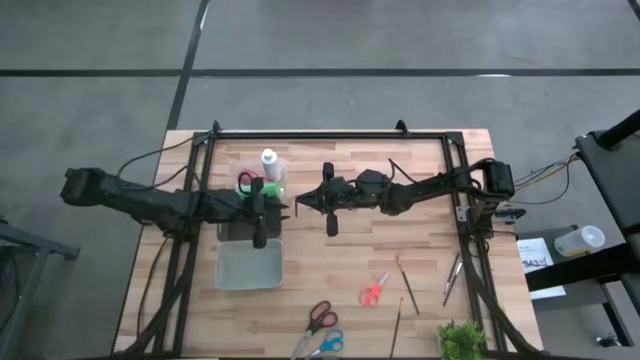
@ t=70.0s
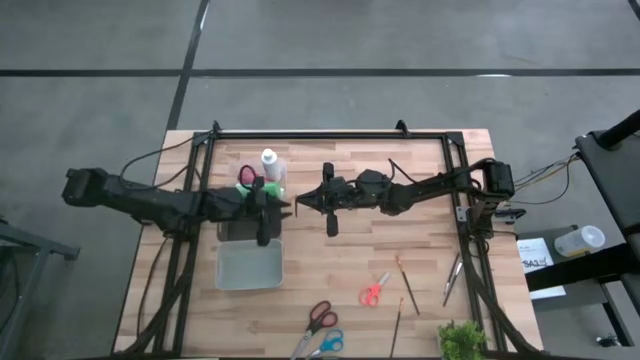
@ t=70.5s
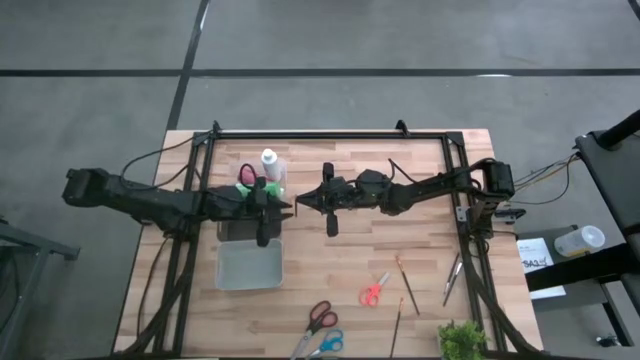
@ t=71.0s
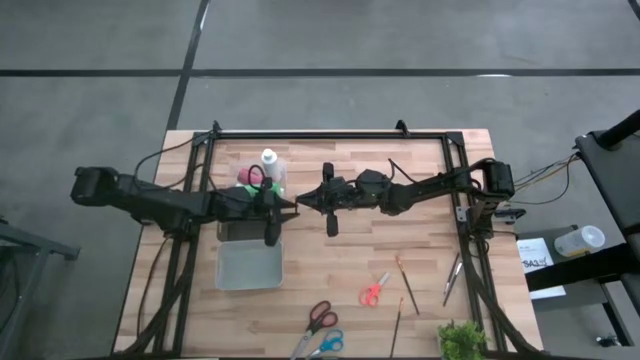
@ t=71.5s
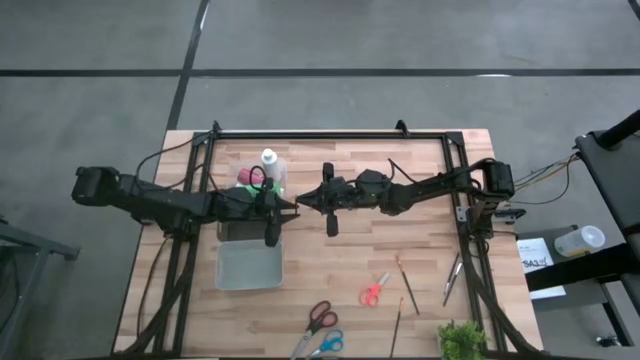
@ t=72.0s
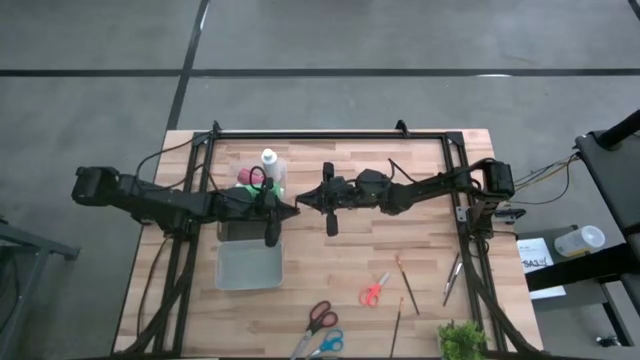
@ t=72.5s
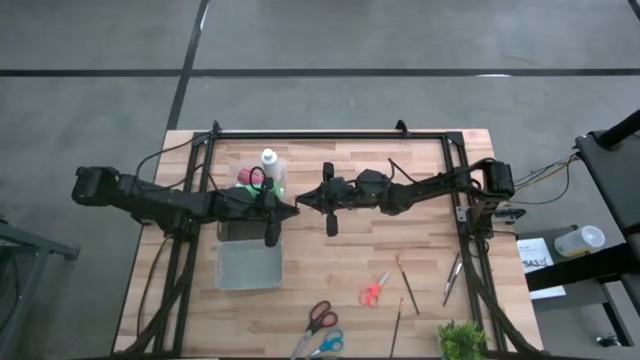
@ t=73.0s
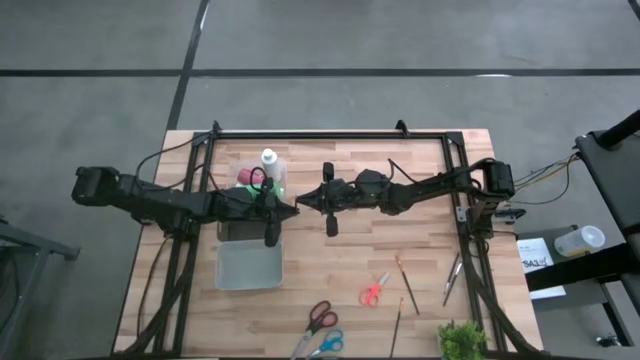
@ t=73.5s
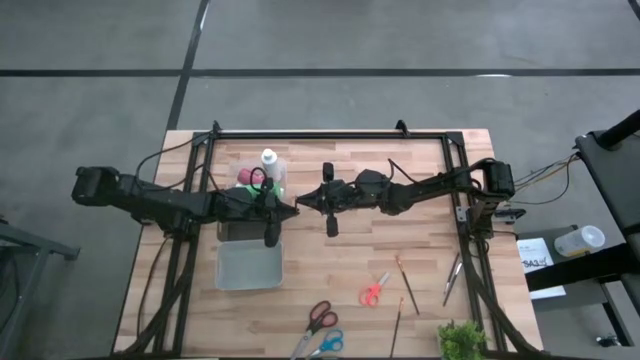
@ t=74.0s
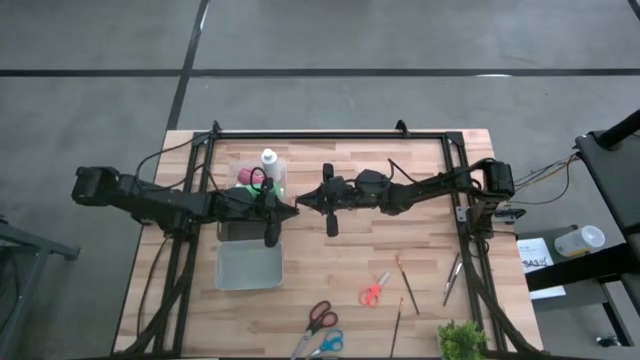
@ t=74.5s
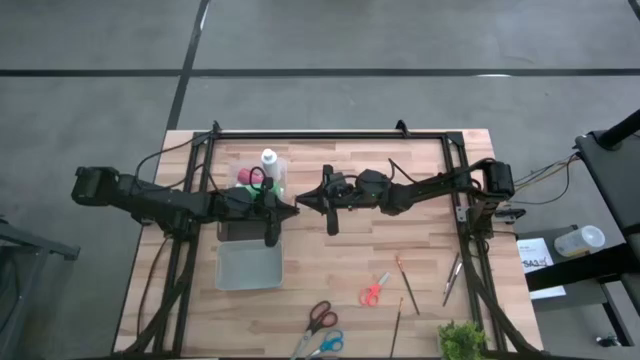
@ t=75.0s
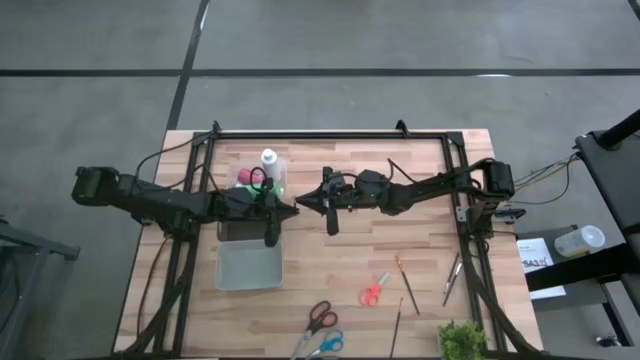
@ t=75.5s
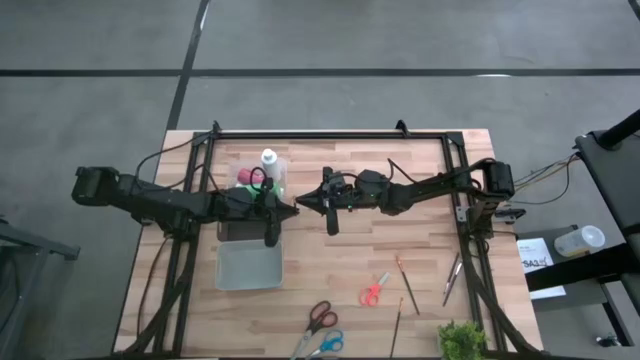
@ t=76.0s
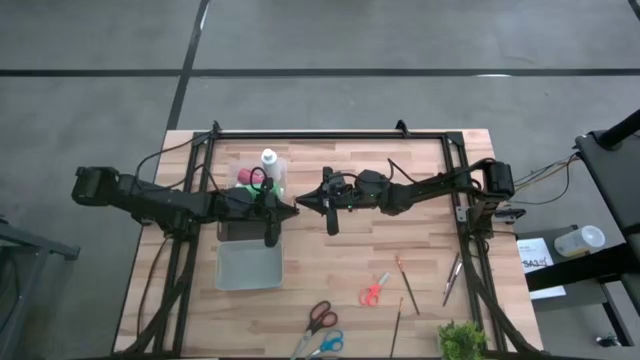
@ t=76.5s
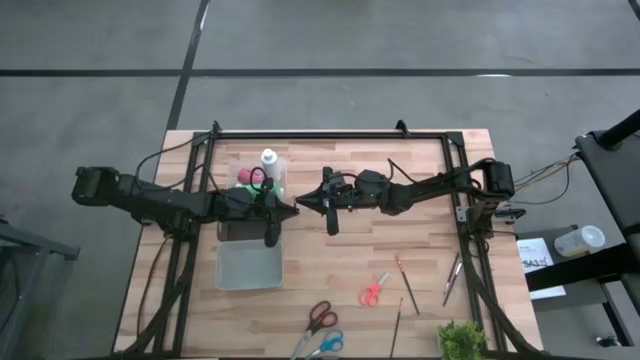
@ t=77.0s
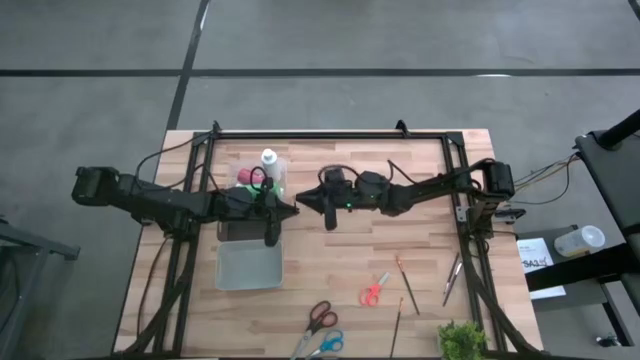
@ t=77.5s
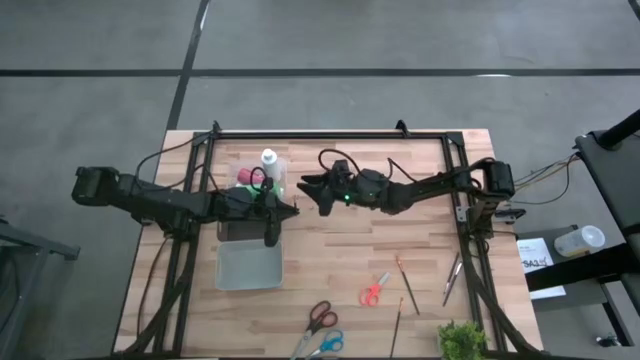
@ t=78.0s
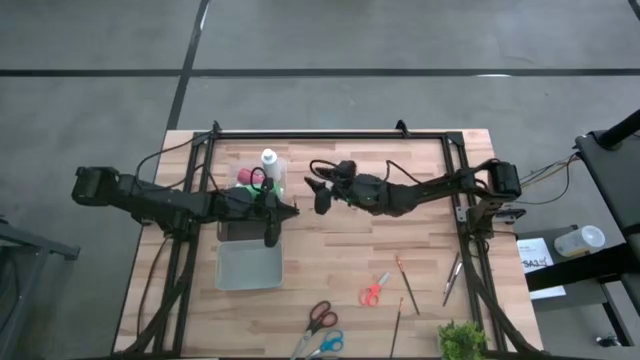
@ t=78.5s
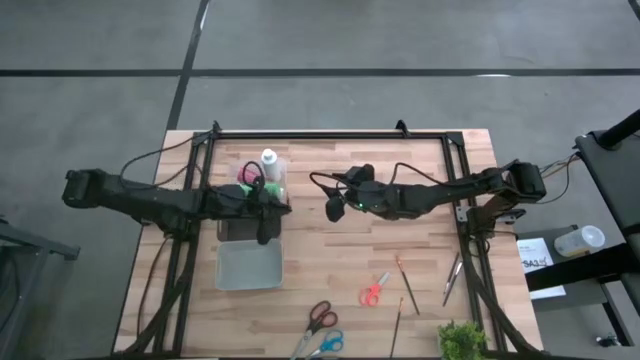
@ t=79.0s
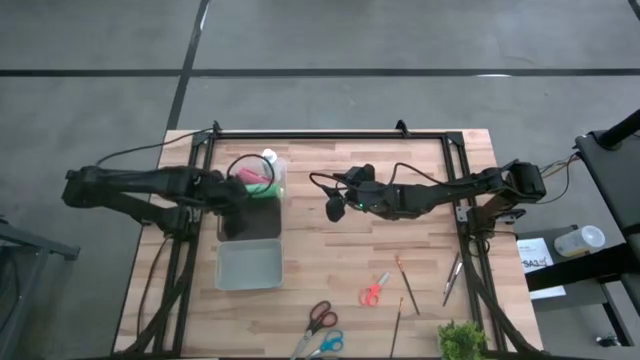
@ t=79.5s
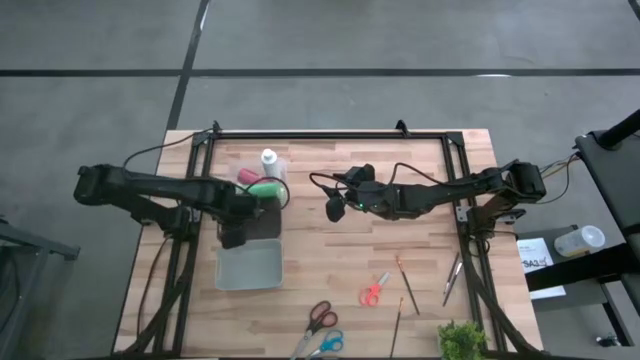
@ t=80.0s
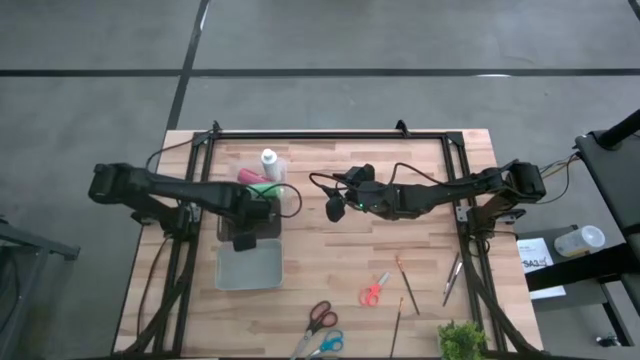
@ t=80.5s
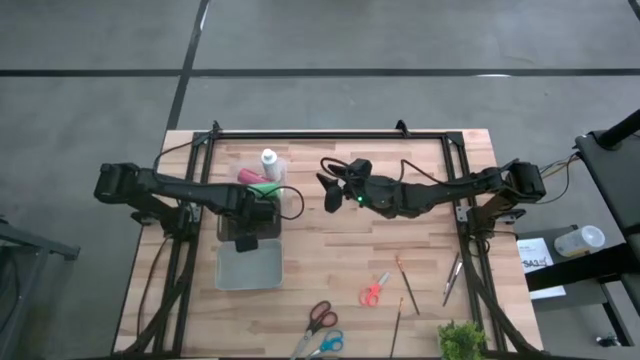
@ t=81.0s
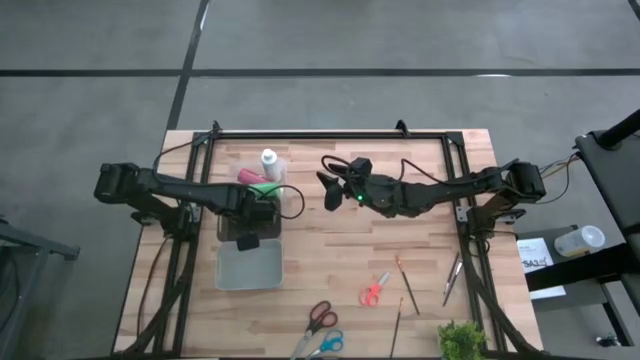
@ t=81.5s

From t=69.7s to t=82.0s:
Task: Pick & Place Paint Supplies
Put the left silver makeup brush into the black bin

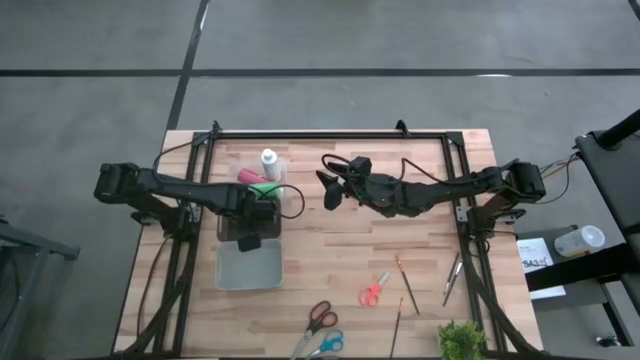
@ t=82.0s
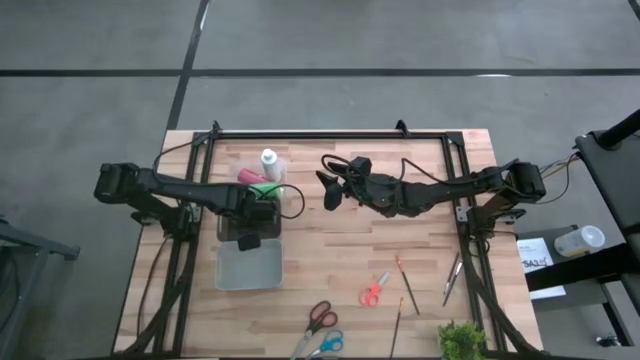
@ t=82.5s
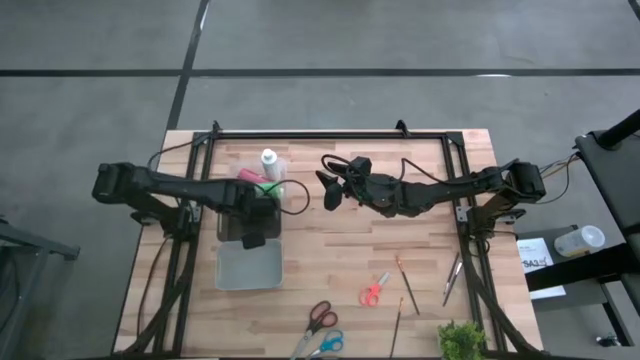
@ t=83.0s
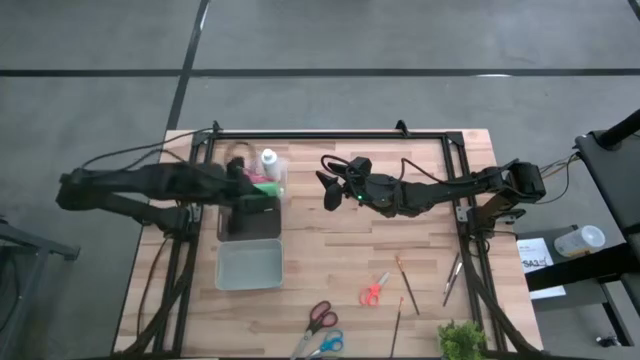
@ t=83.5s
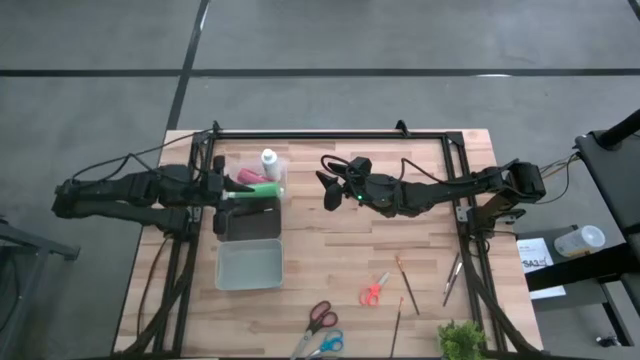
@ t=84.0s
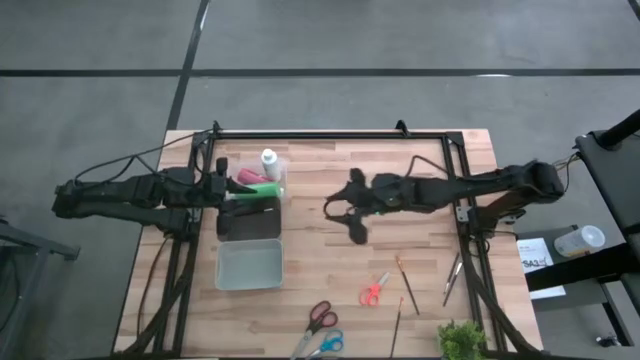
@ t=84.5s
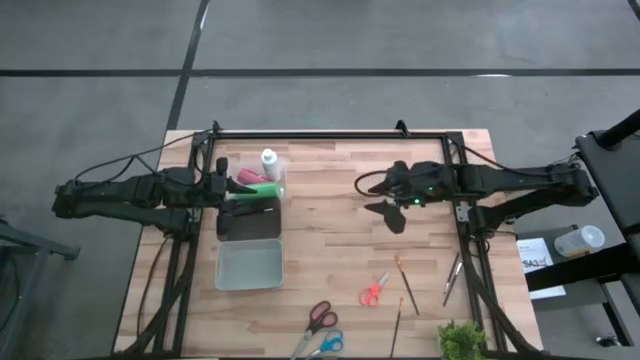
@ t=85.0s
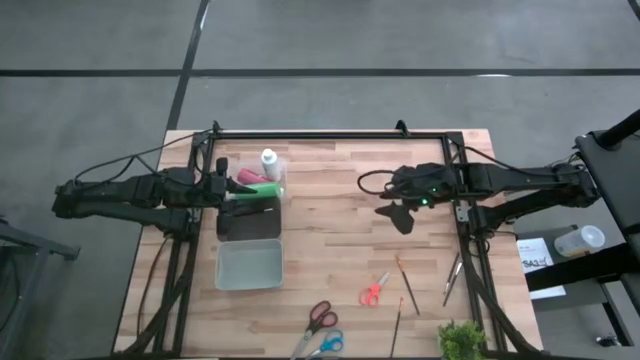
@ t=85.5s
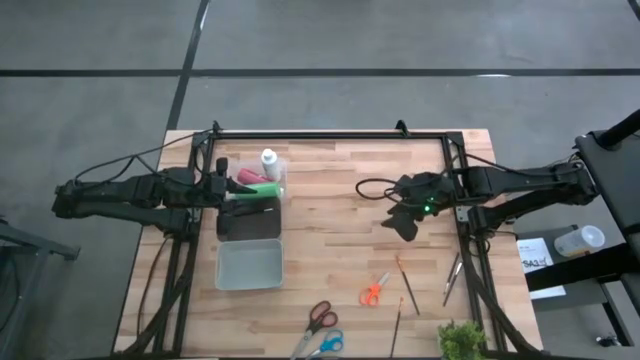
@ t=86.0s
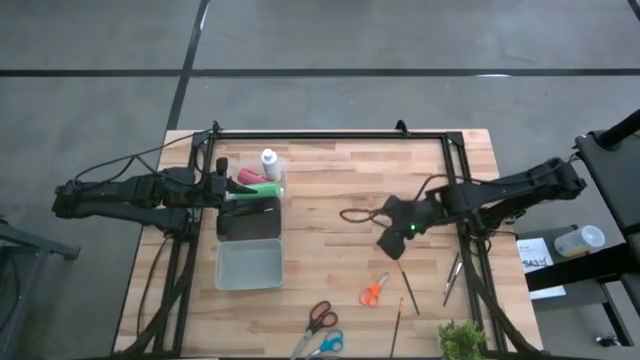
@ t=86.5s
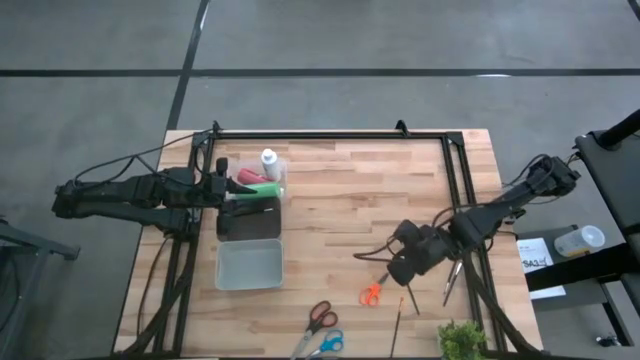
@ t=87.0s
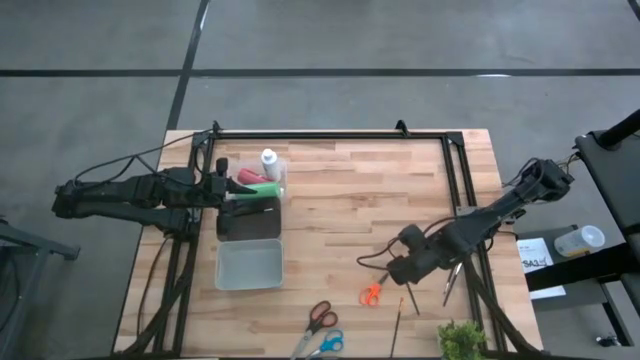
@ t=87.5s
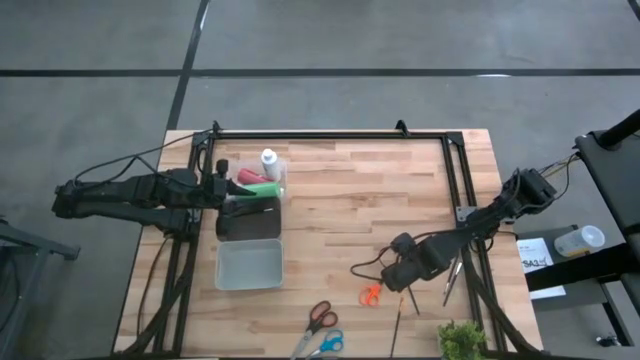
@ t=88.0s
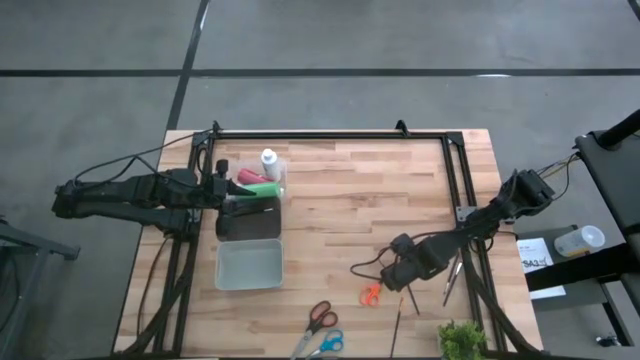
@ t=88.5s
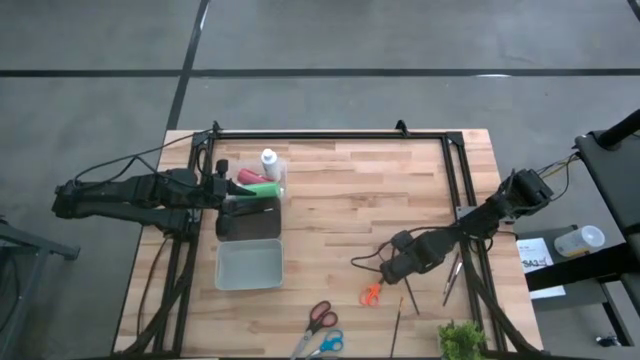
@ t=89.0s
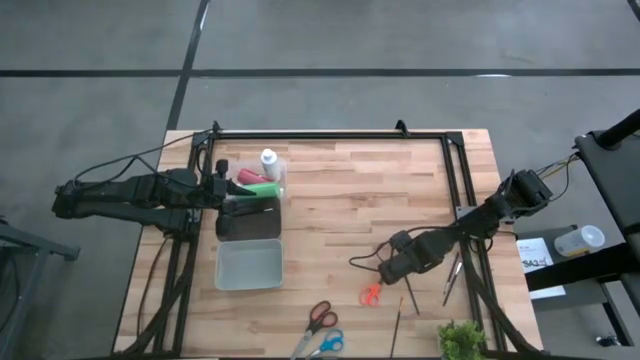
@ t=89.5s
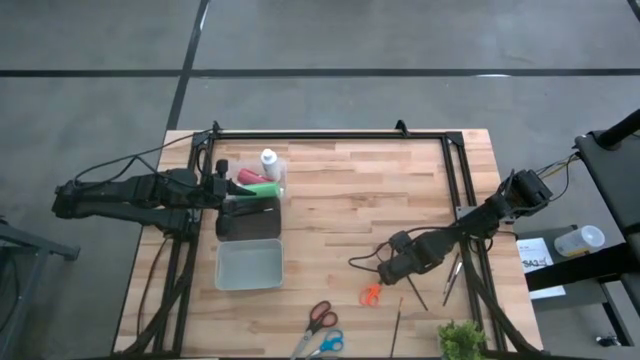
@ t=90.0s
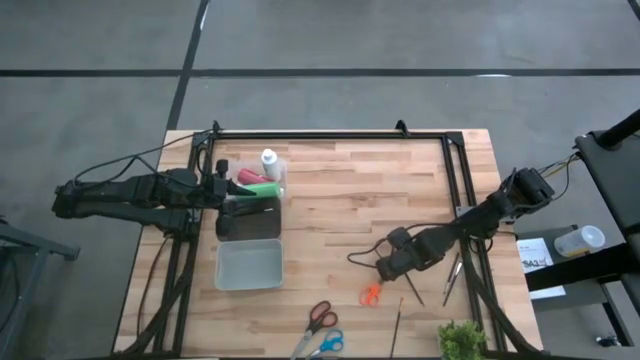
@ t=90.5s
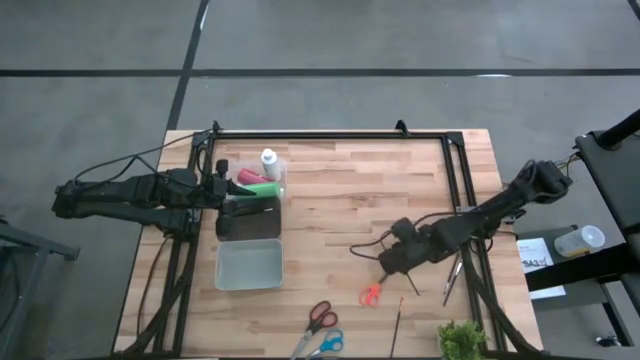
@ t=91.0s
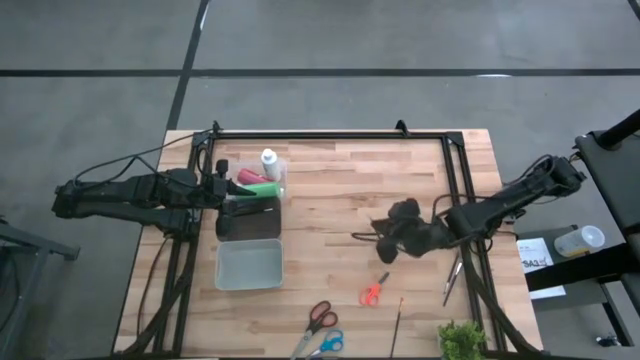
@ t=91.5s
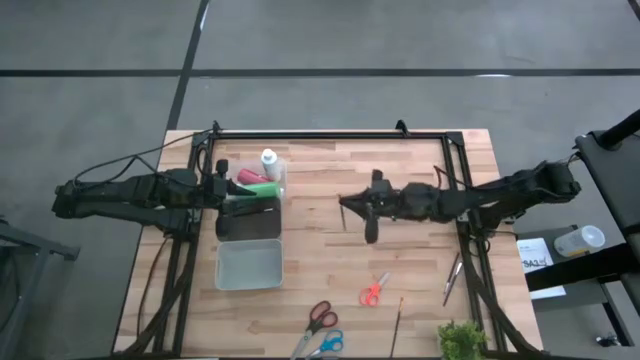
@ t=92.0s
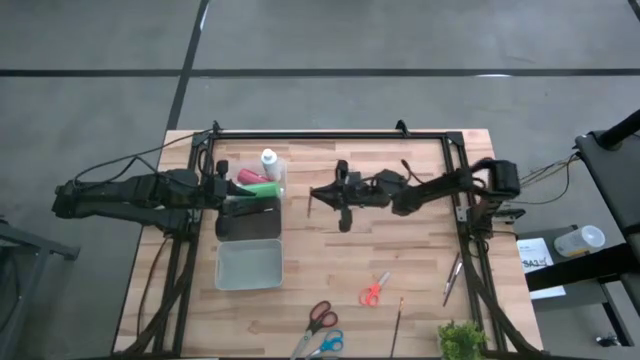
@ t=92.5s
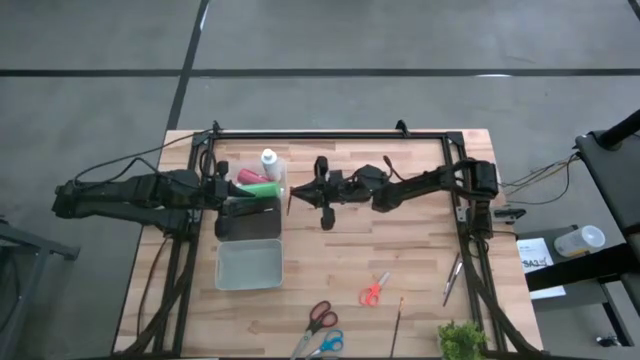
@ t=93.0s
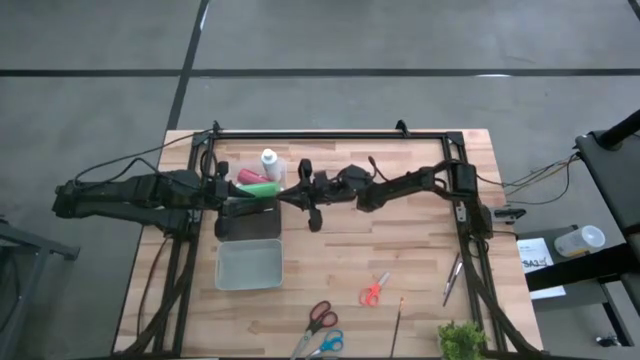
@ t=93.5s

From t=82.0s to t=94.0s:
Put the top orange paint brush into the black bin
